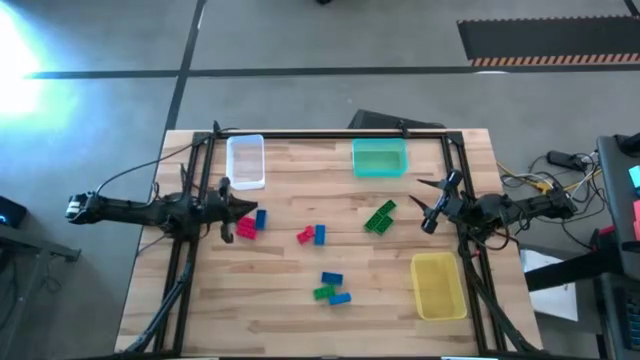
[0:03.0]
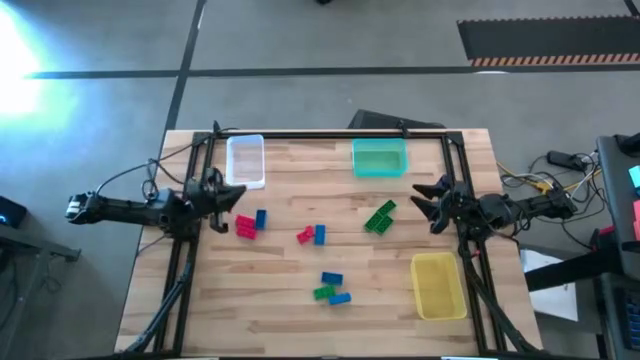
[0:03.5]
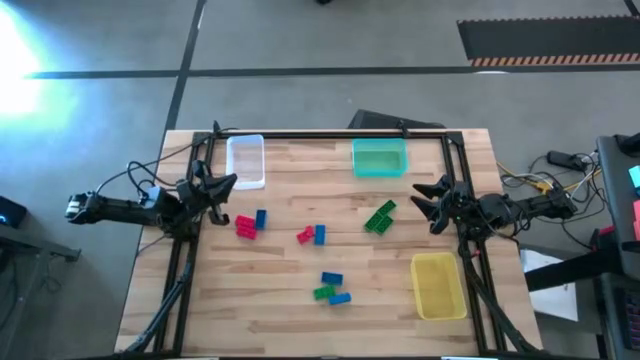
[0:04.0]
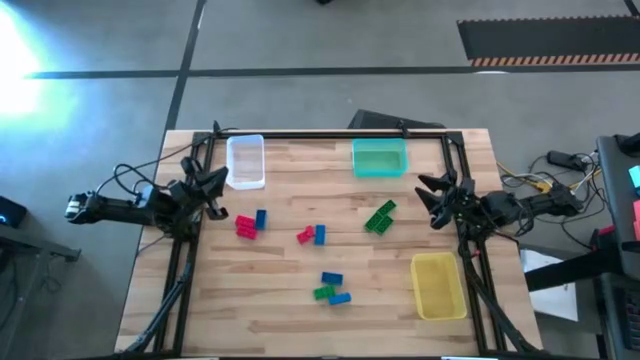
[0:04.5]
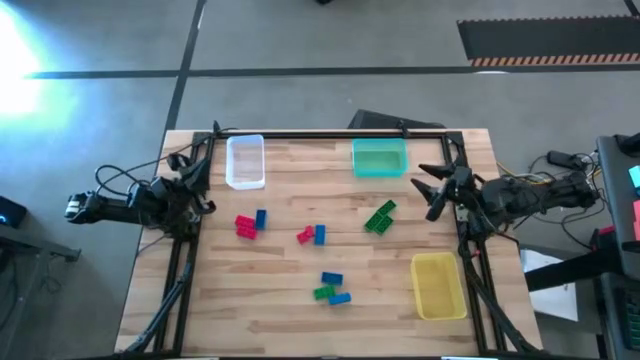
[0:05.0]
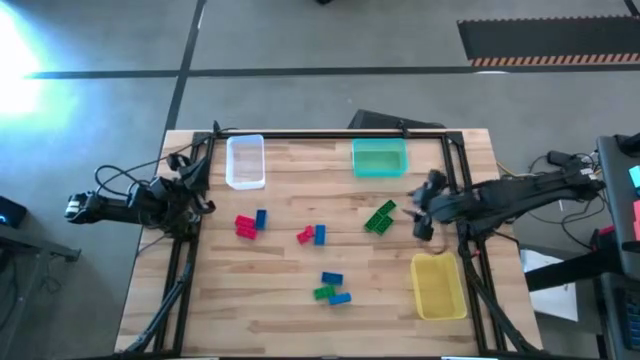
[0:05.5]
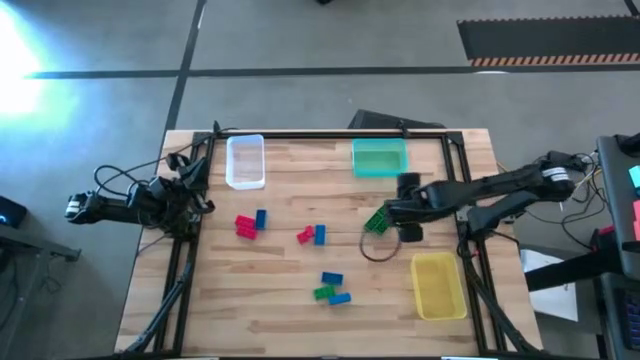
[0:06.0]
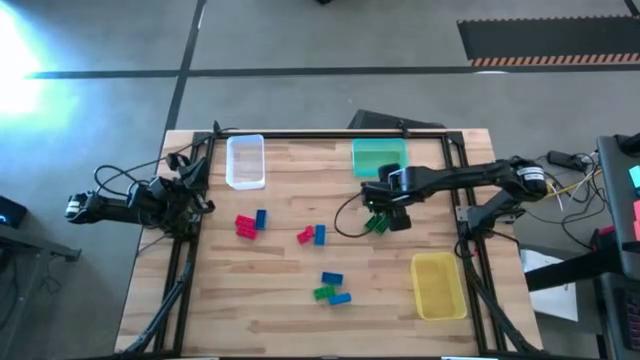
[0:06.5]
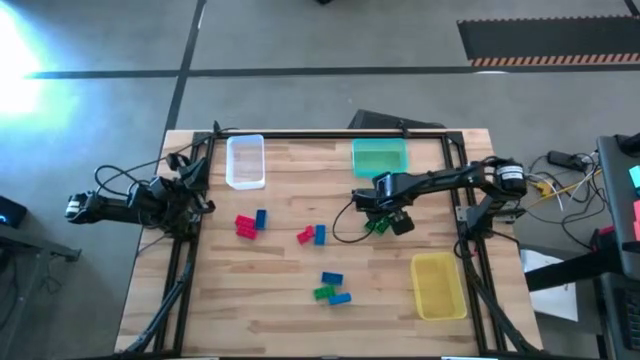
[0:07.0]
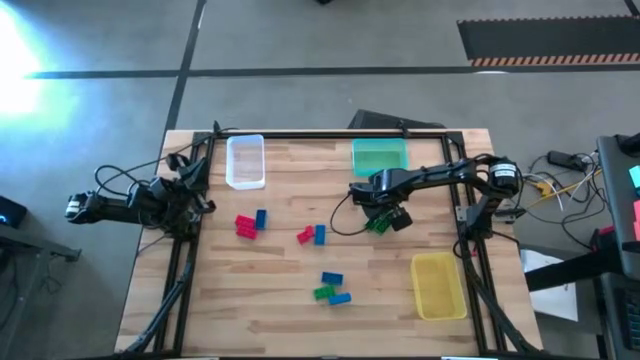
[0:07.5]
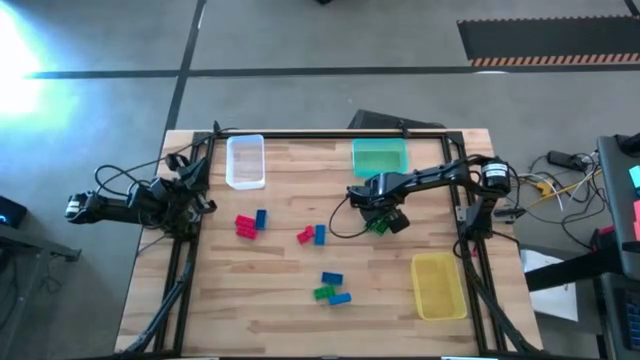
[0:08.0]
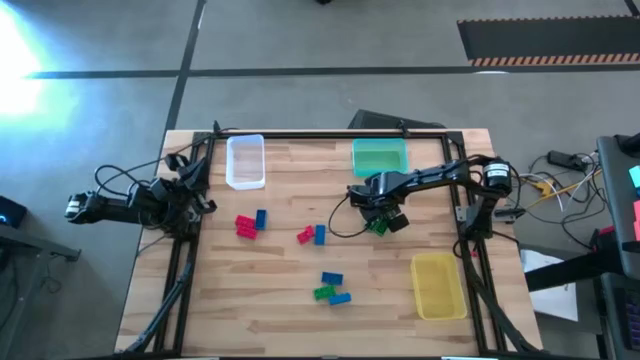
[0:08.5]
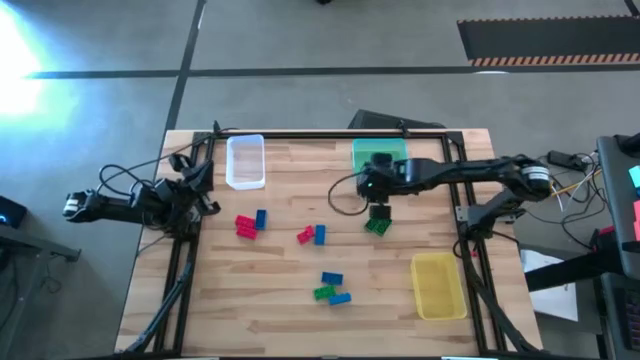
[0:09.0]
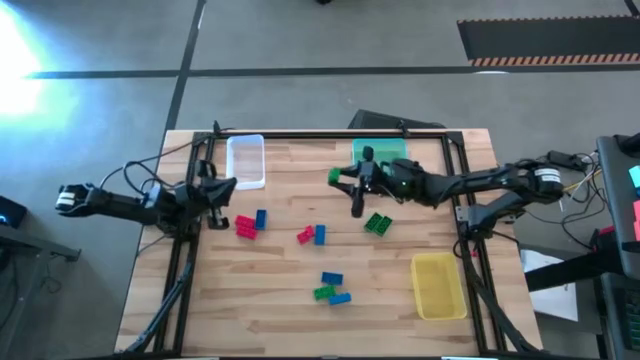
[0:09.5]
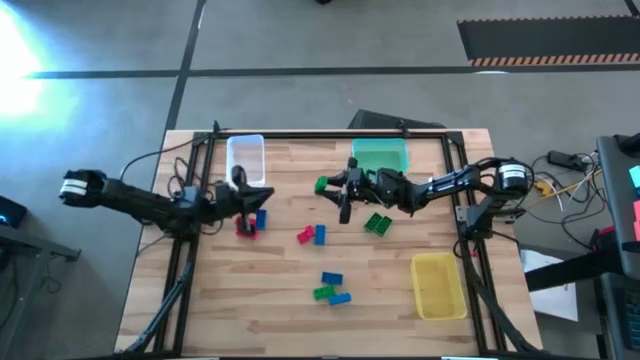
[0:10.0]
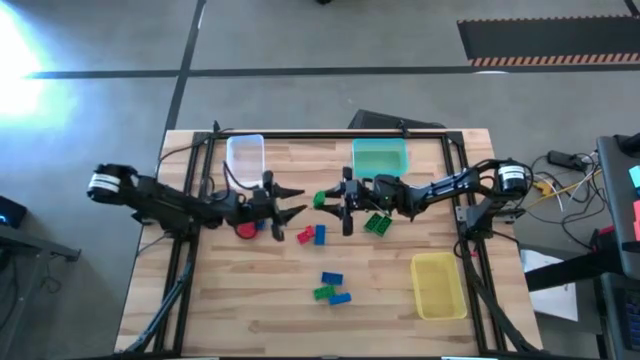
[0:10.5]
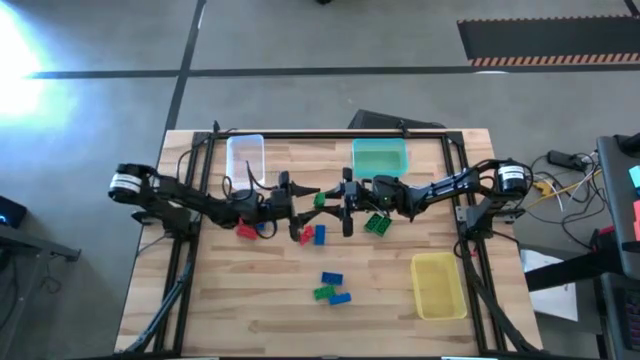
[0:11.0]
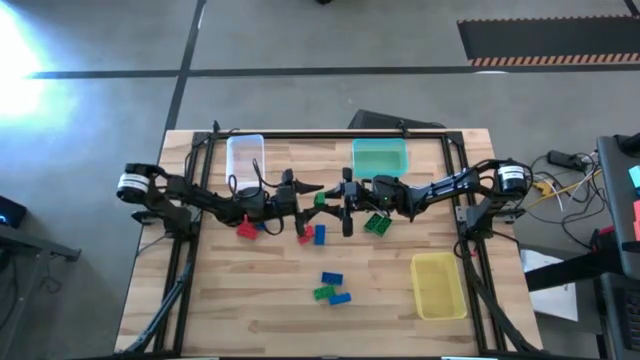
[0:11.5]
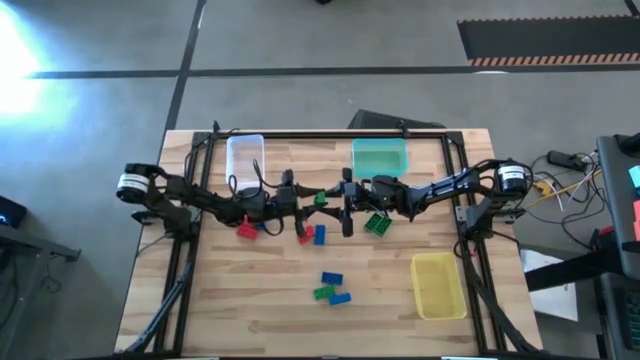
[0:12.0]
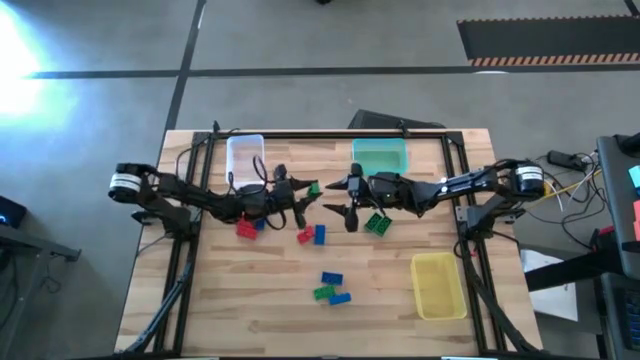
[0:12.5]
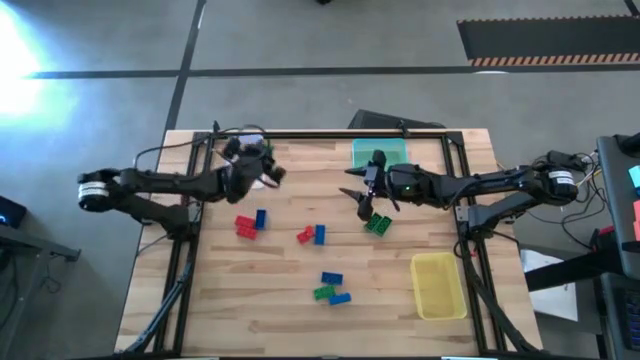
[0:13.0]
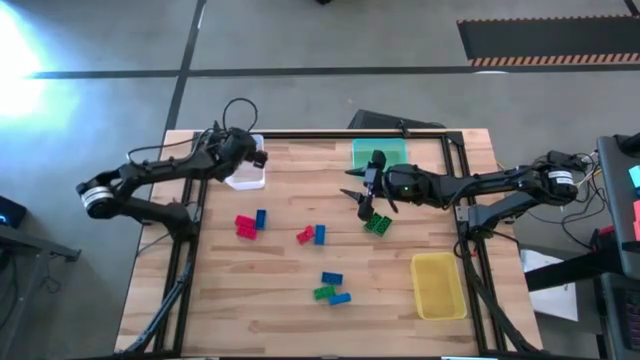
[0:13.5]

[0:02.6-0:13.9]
Task: Sort & place blocks by color
Put the green game piece into the white bin

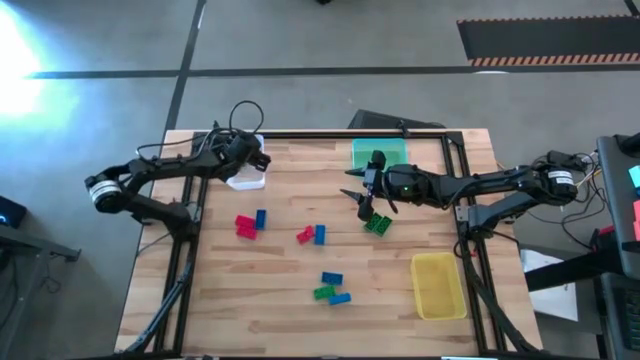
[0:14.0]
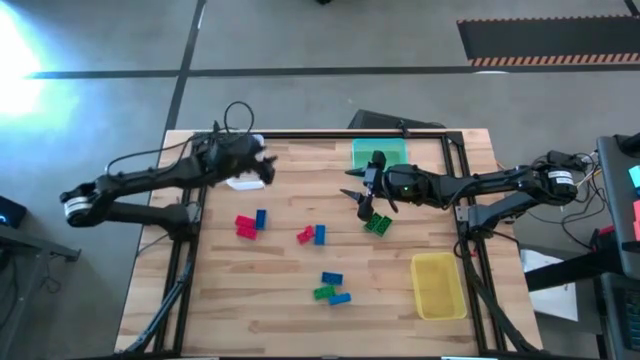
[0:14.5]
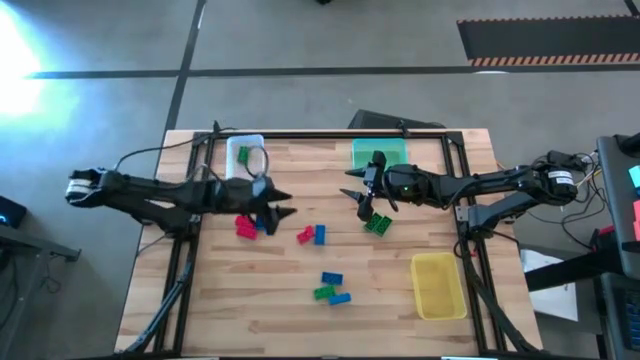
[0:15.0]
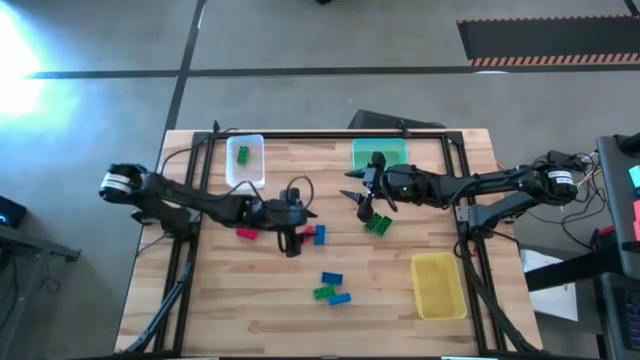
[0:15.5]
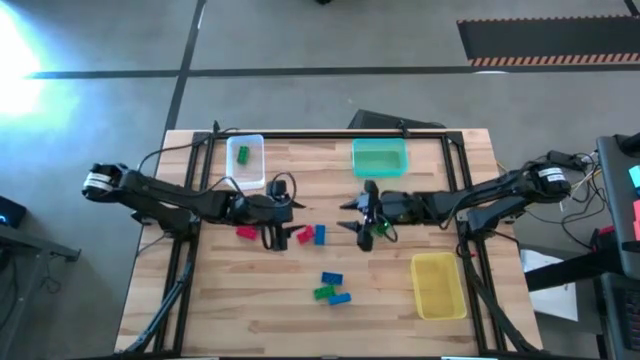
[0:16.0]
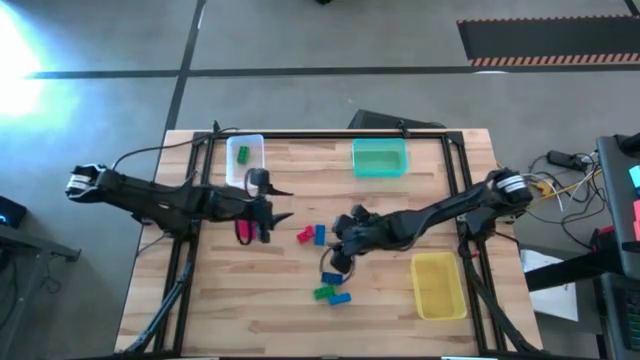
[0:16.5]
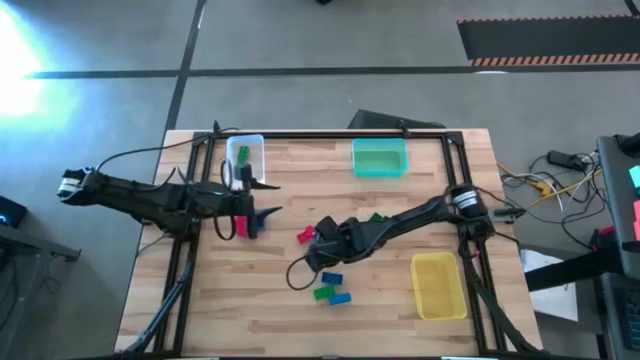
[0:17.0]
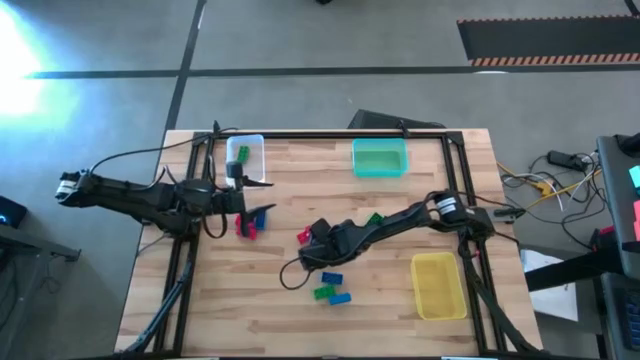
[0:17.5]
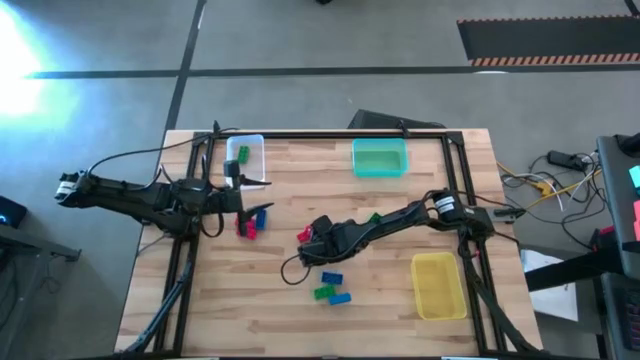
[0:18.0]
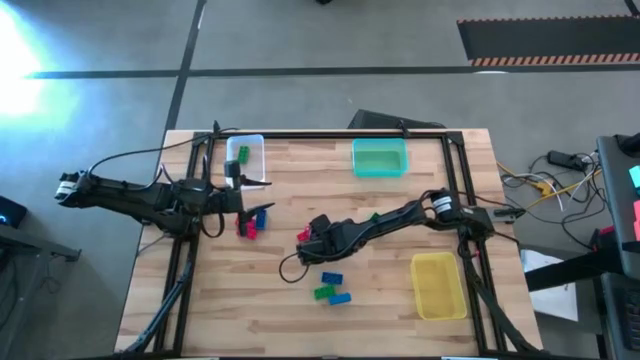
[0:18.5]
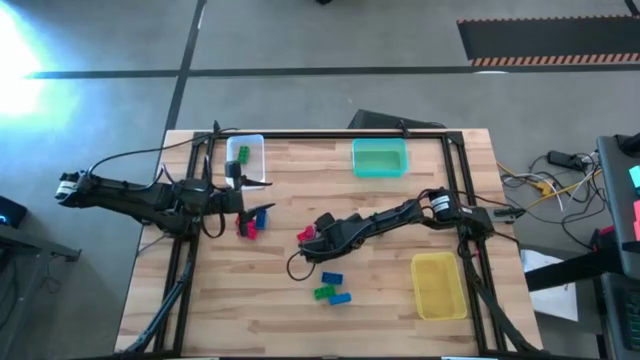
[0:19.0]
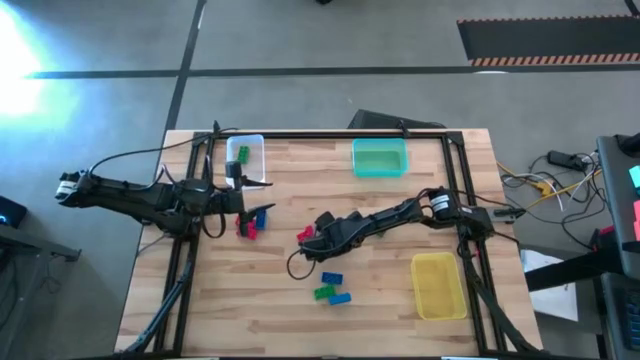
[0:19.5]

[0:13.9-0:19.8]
Put the blue game piece into the yellow bin

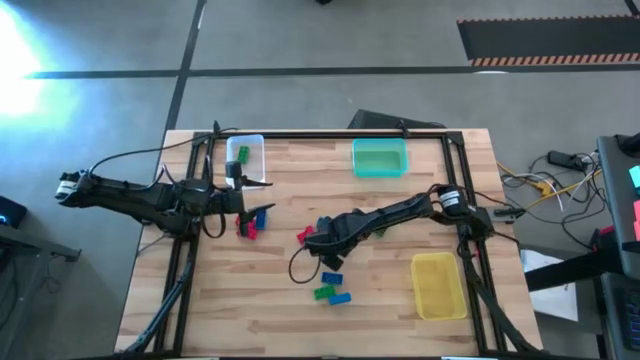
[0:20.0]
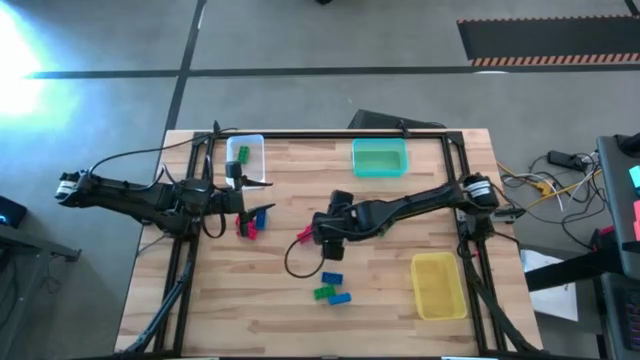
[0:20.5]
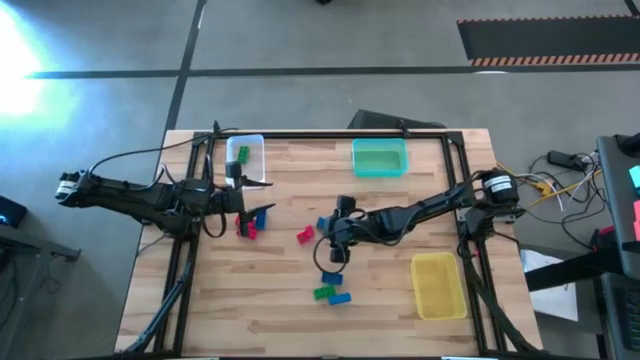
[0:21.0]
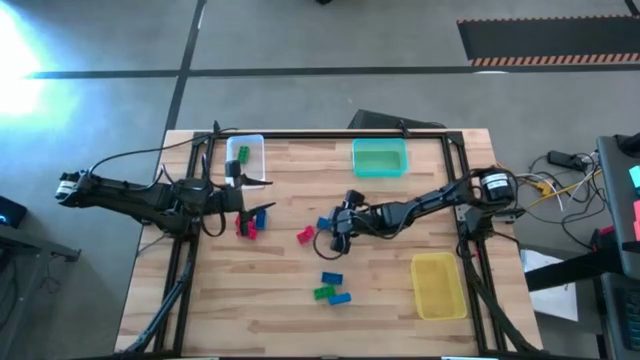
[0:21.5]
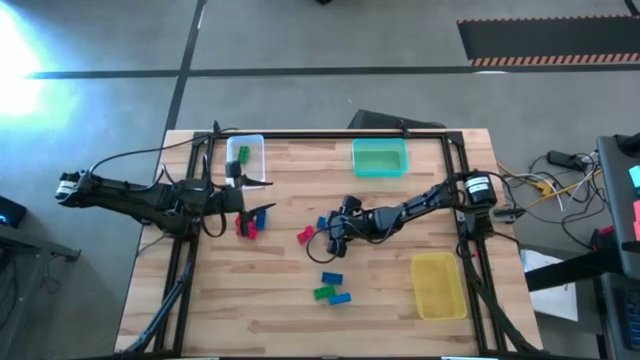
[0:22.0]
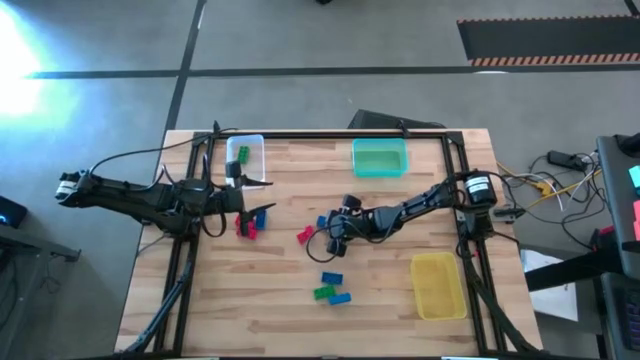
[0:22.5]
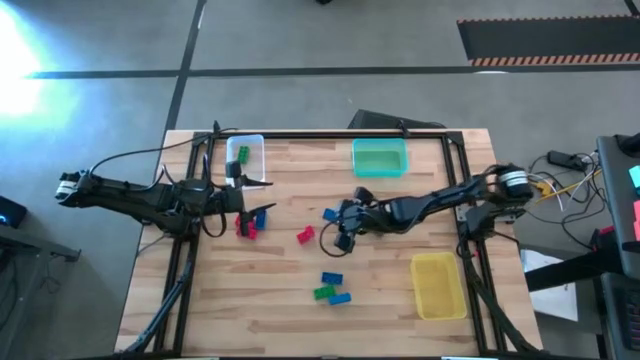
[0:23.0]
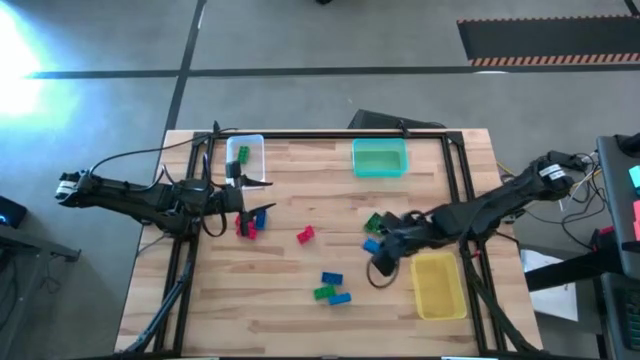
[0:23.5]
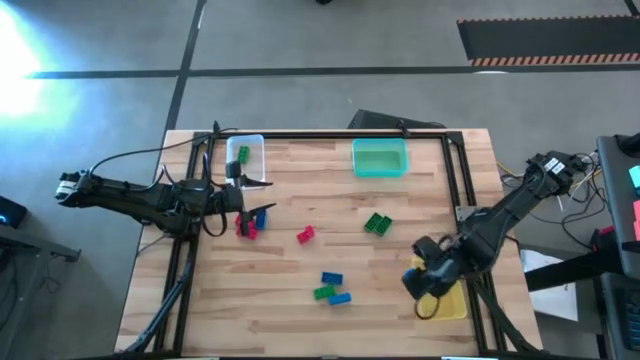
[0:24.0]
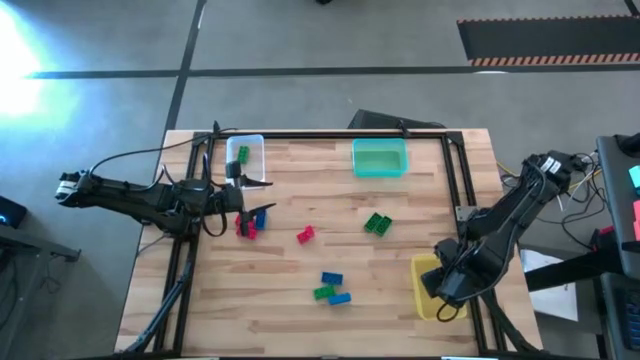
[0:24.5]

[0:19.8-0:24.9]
Put the blue game piece into the yellow bin
